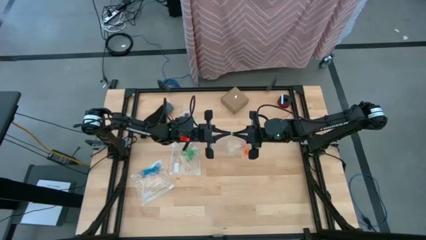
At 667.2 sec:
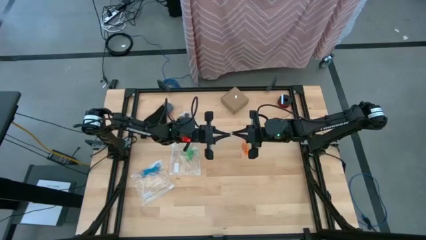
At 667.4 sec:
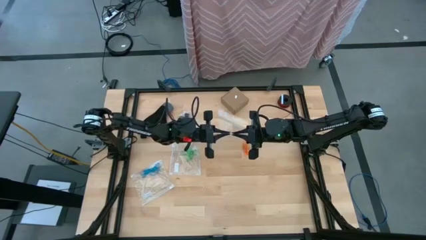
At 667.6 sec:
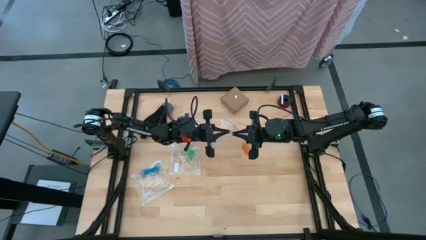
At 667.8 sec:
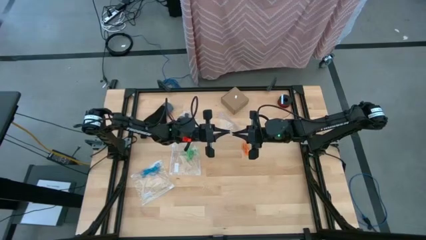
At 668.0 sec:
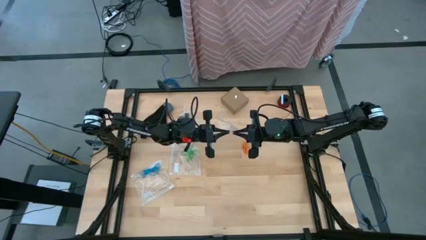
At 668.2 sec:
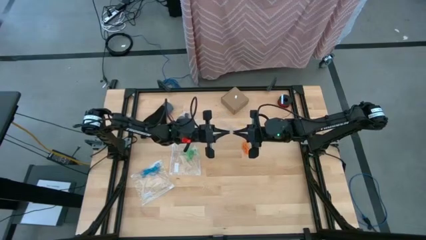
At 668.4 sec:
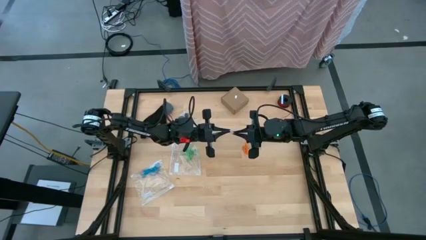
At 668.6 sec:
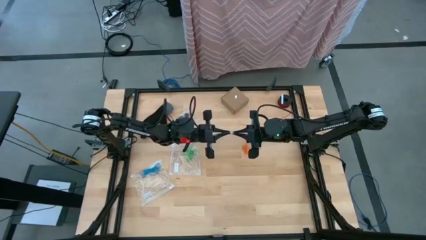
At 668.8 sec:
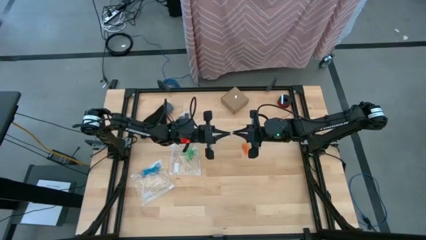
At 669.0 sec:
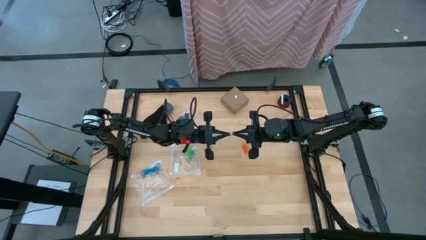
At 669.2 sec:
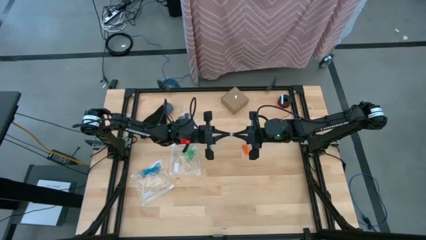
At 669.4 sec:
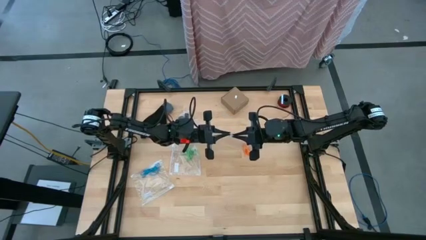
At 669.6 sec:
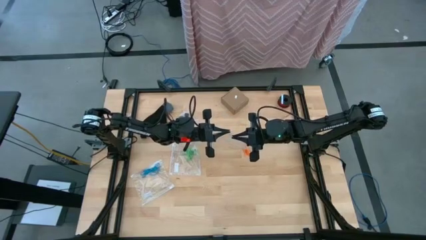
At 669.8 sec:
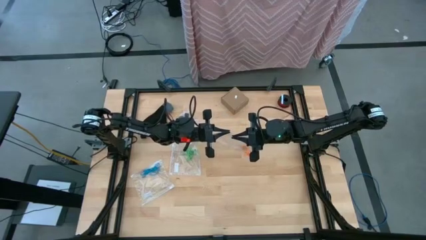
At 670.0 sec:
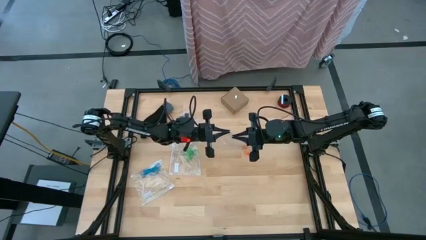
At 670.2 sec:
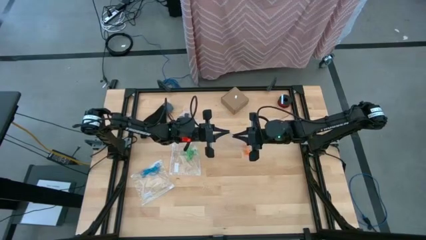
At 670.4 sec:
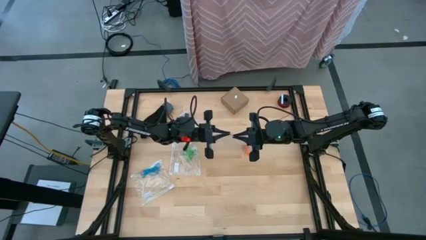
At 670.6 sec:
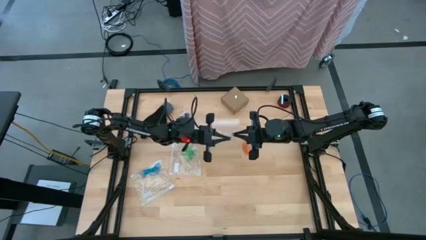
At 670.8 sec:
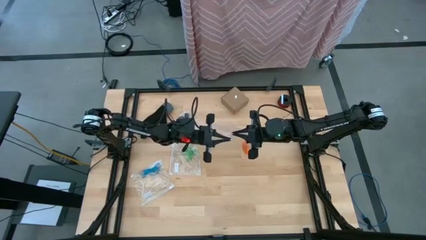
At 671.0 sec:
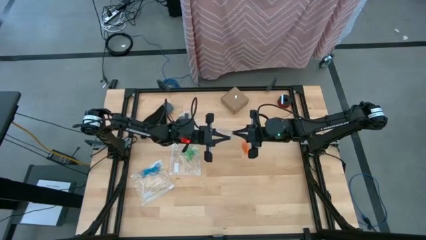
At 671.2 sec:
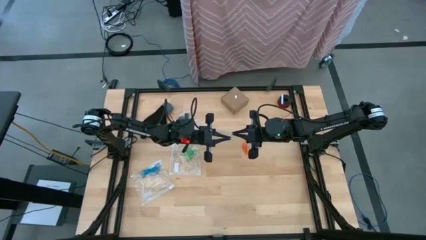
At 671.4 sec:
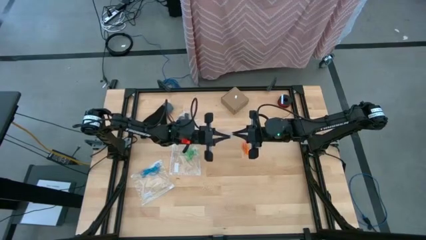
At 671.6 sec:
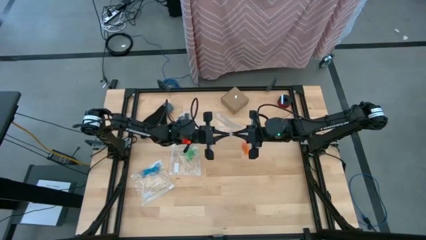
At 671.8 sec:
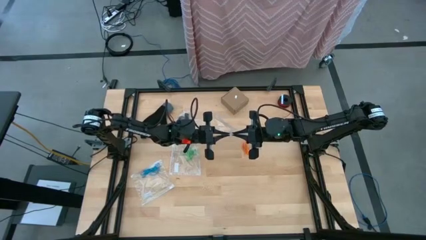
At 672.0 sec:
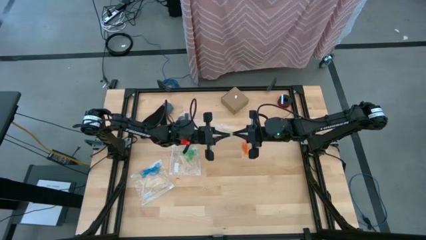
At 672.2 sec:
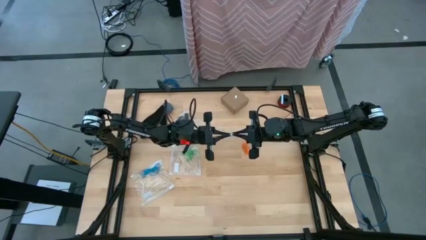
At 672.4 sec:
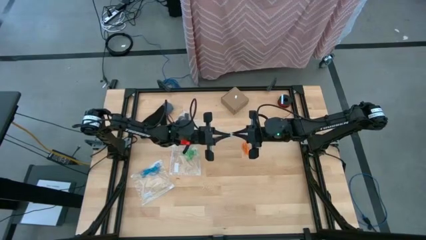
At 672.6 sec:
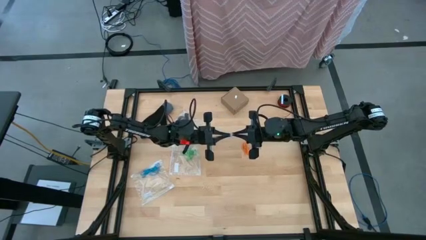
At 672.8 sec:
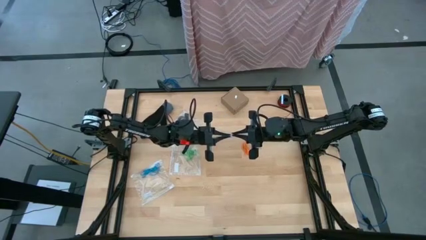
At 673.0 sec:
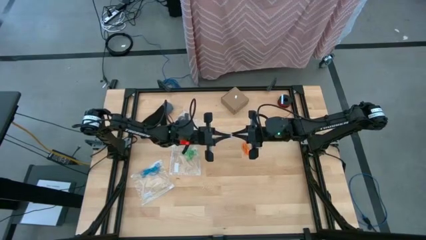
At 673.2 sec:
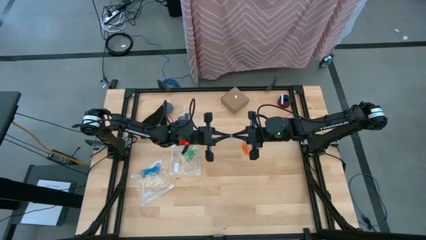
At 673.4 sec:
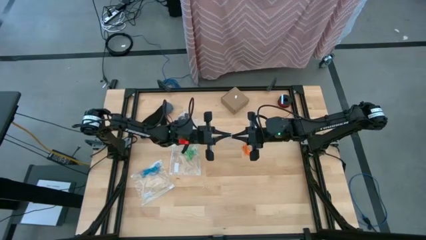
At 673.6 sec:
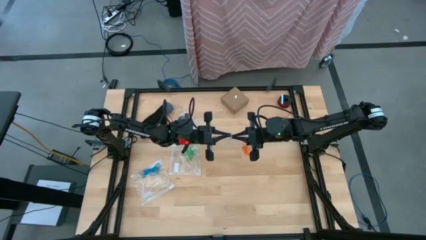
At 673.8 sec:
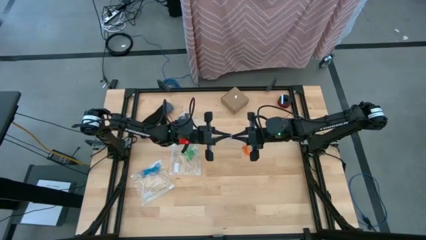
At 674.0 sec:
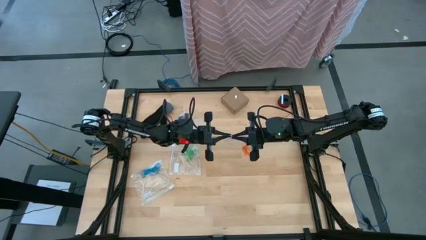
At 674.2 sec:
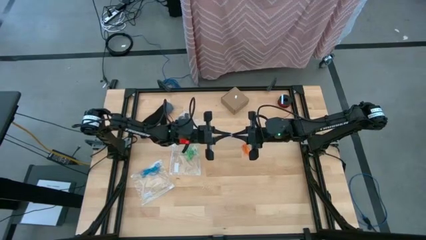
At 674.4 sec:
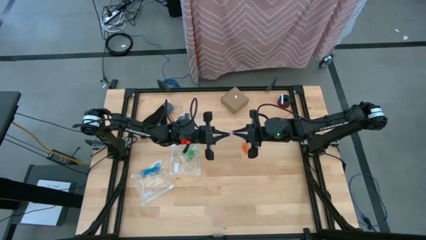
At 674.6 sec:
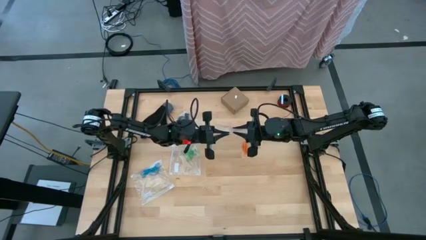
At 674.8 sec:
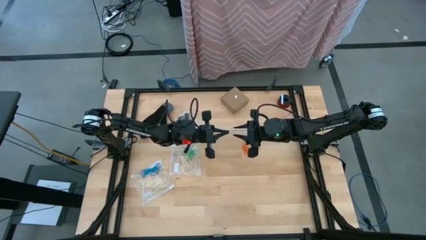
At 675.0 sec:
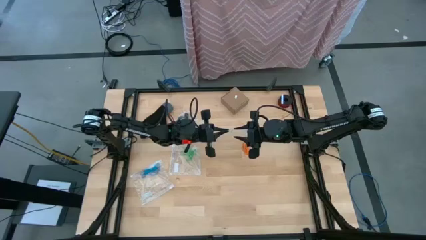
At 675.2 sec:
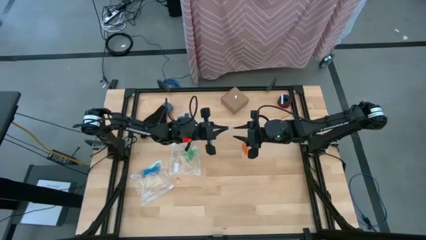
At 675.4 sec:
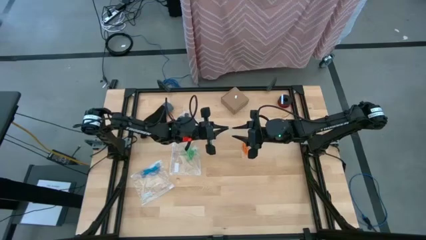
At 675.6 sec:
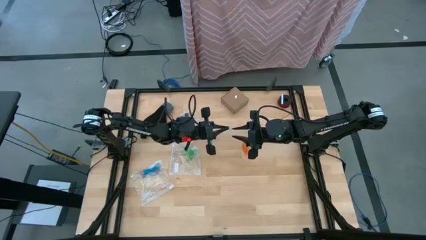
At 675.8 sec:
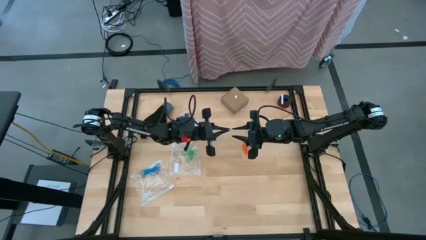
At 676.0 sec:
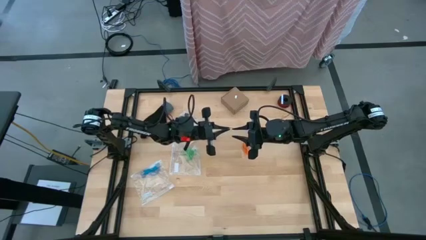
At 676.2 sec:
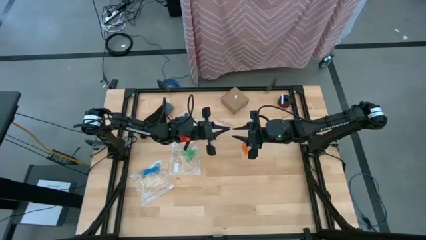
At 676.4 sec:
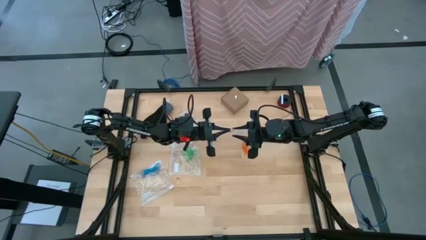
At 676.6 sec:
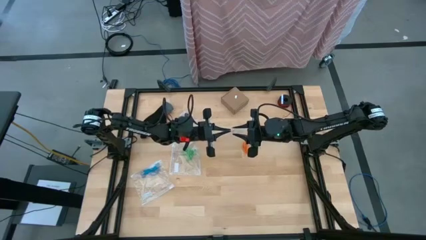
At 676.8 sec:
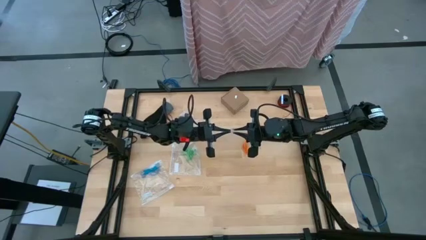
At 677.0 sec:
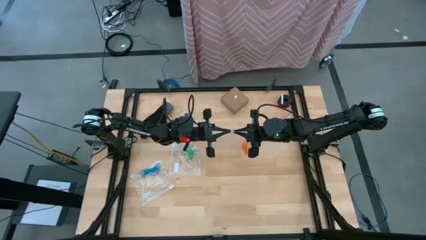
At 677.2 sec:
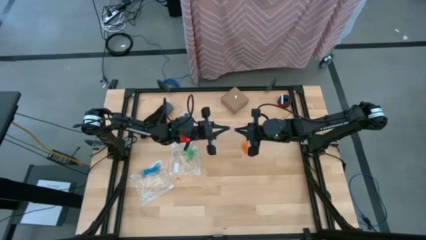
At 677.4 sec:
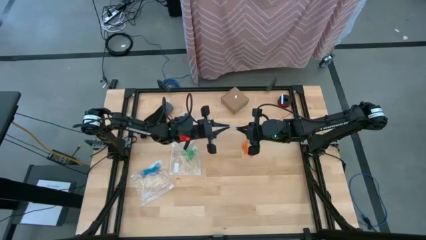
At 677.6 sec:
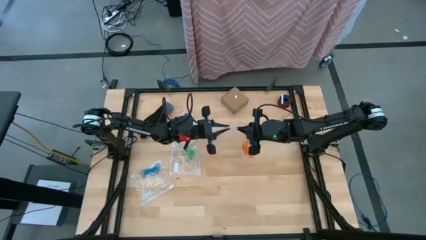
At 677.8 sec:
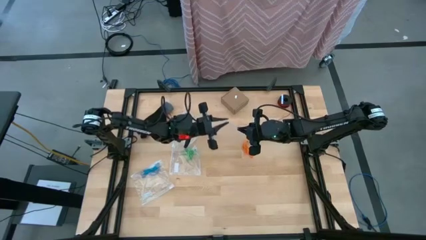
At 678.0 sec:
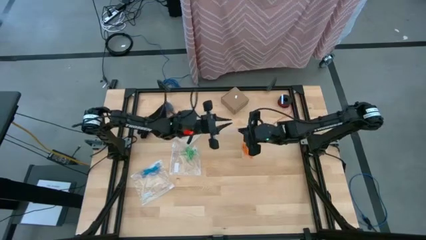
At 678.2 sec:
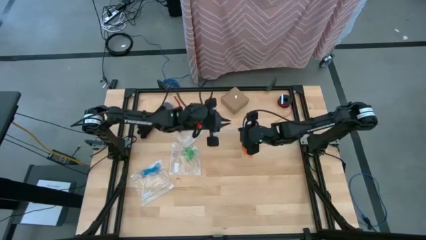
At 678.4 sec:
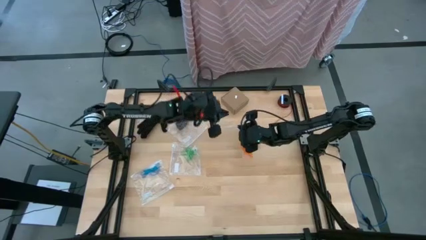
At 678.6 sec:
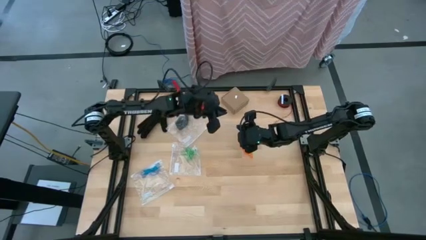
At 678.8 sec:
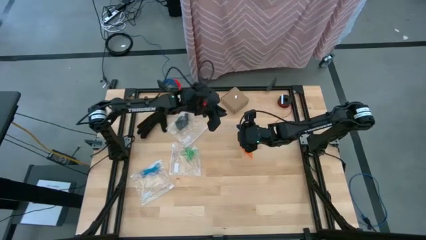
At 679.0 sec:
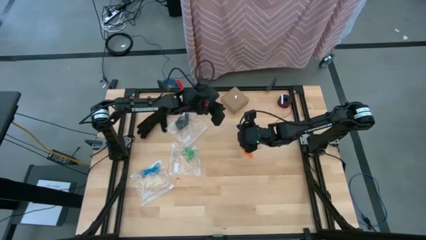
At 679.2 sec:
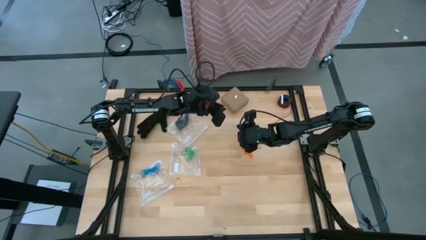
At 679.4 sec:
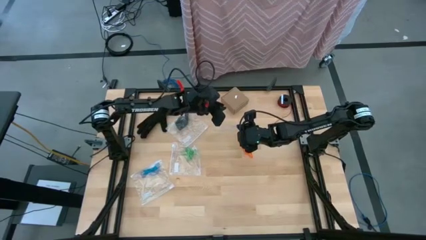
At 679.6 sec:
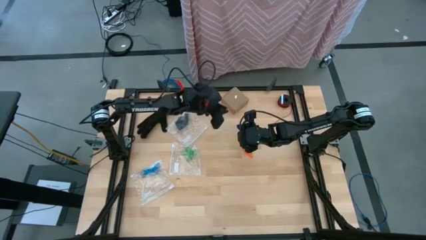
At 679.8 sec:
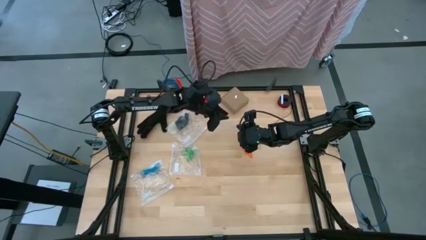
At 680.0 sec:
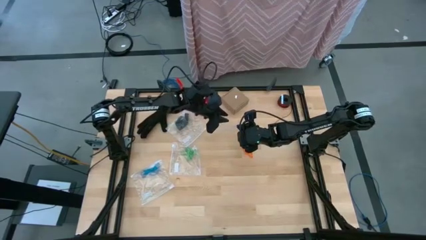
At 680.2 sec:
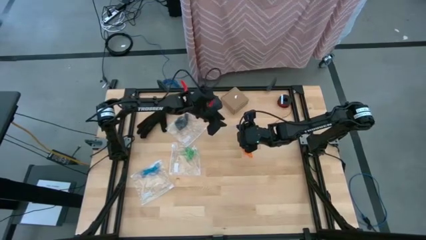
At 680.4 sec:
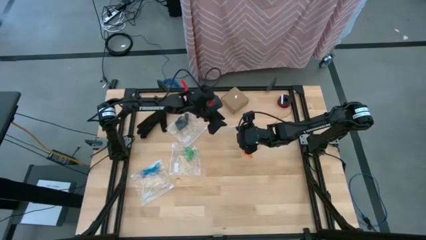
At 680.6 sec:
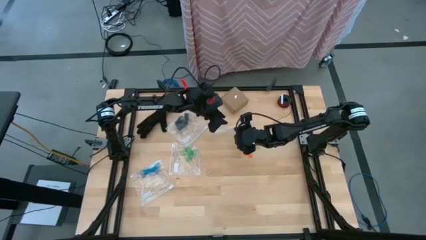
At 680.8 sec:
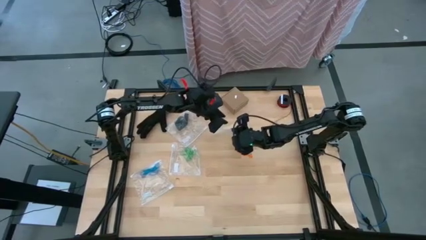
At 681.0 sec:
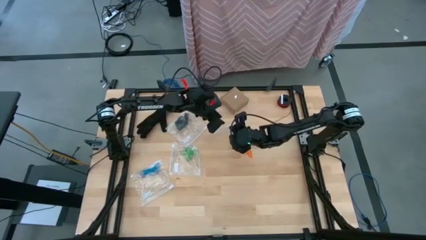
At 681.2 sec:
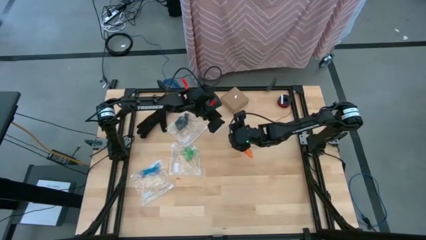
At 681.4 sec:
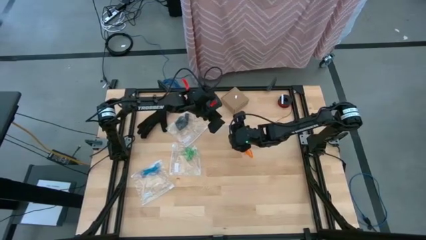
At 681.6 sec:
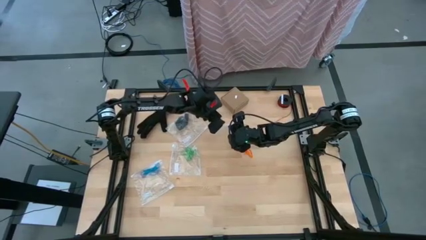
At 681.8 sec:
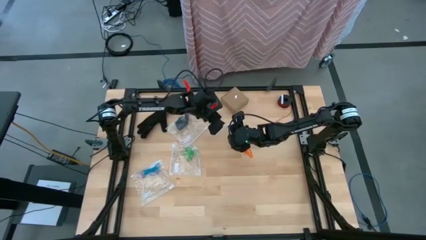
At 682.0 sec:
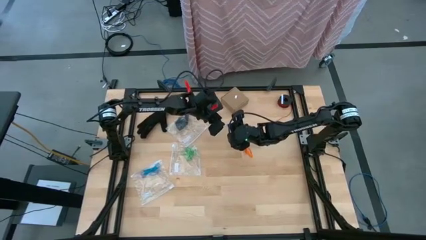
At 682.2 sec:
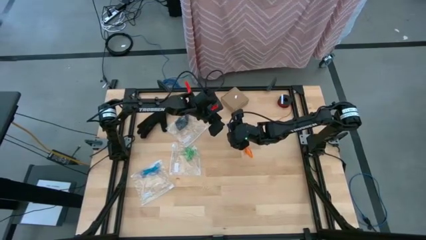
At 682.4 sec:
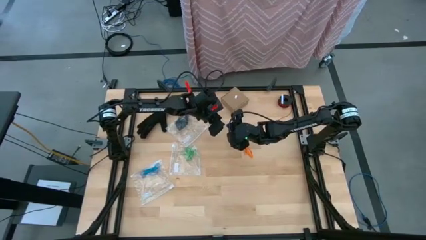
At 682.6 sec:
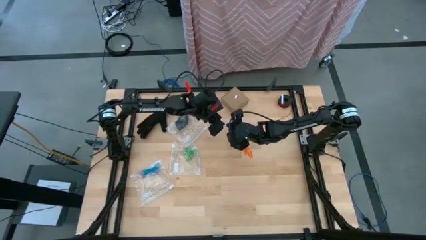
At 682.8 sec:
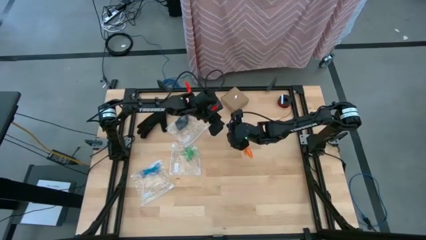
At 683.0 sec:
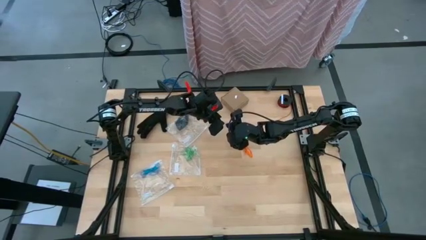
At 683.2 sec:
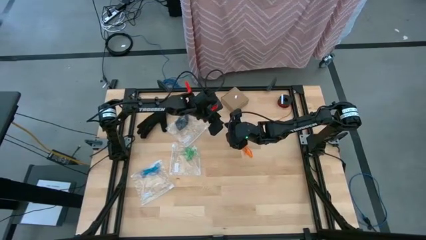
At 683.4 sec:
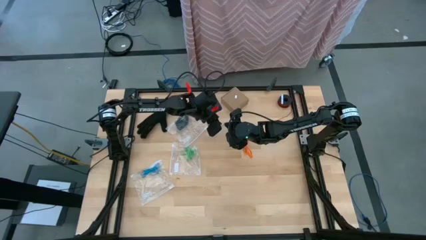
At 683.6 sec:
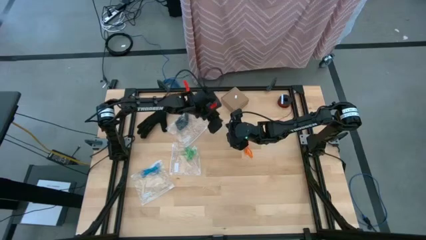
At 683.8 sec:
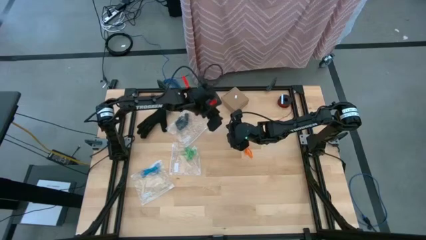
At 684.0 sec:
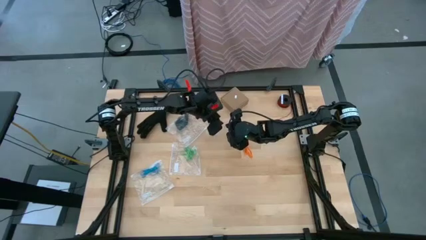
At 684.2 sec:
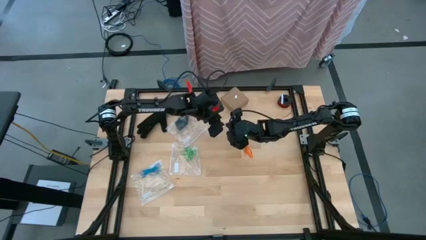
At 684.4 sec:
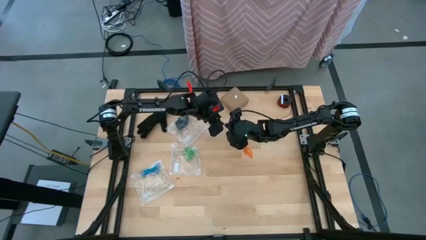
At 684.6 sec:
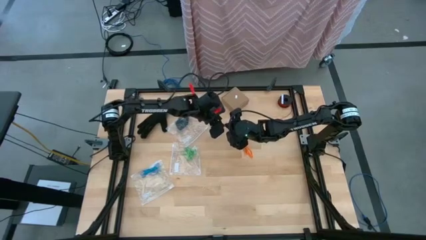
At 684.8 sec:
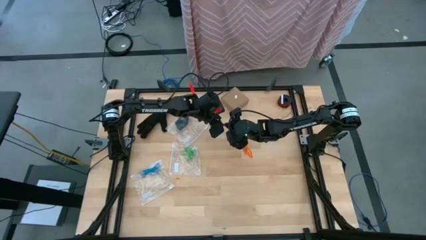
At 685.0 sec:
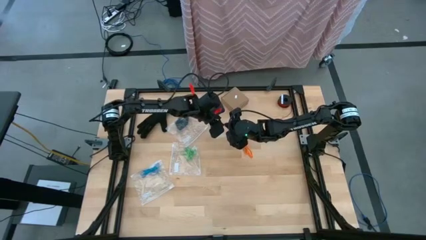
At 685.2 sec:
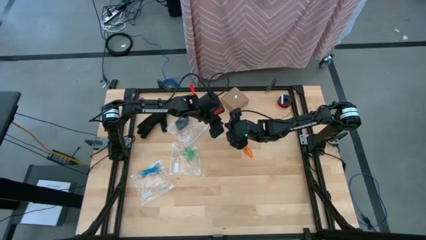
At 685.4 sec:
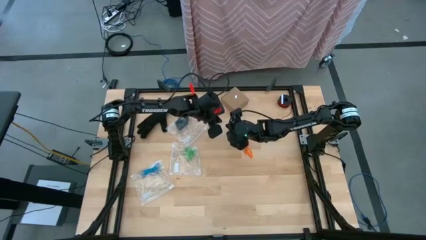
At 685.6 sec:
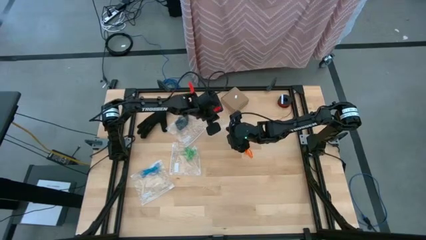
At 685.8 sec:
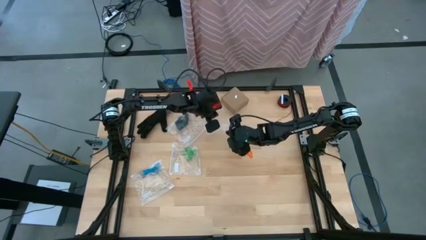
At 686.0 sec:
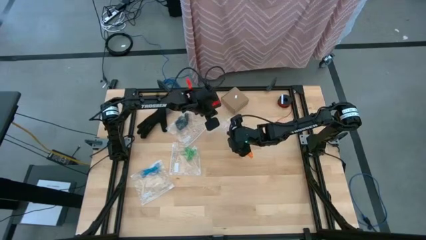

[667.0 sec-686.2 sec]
Task: Sort rubber bands
Open the transparent zip bag
